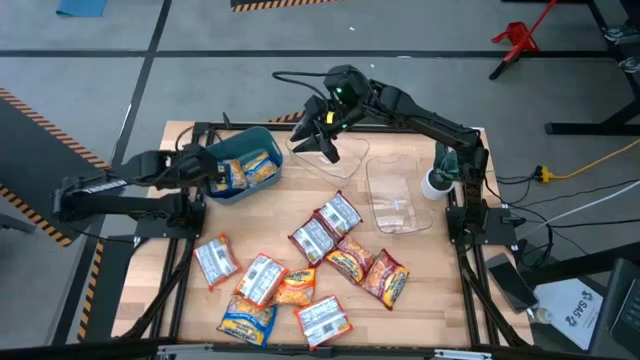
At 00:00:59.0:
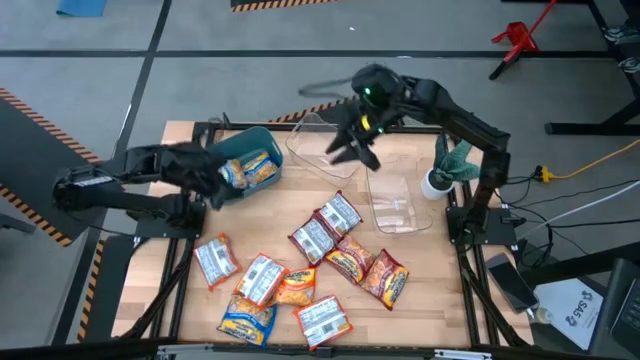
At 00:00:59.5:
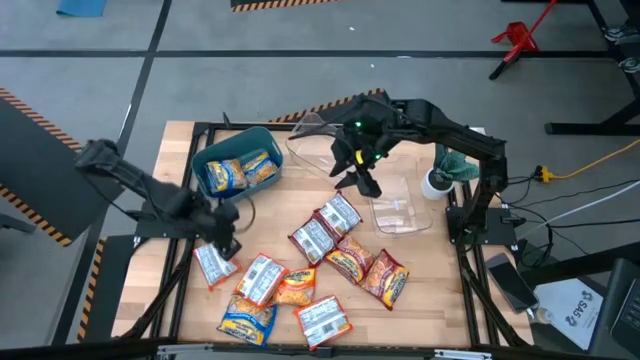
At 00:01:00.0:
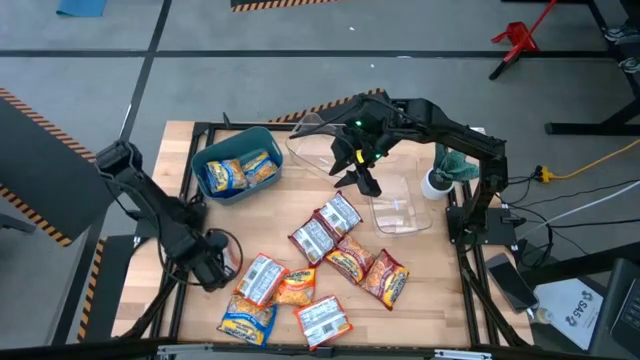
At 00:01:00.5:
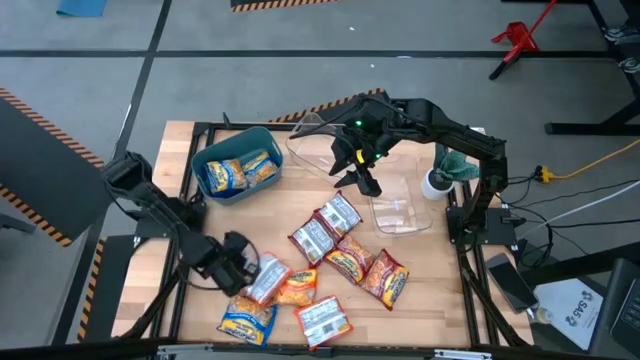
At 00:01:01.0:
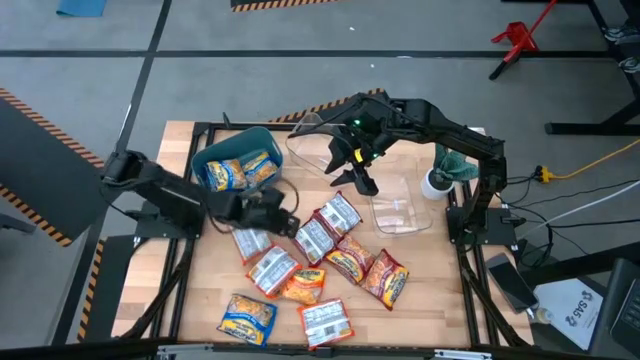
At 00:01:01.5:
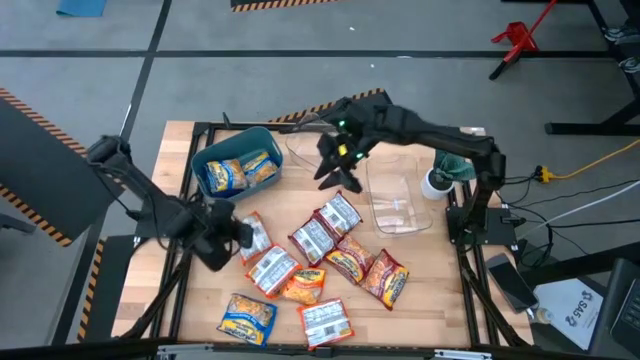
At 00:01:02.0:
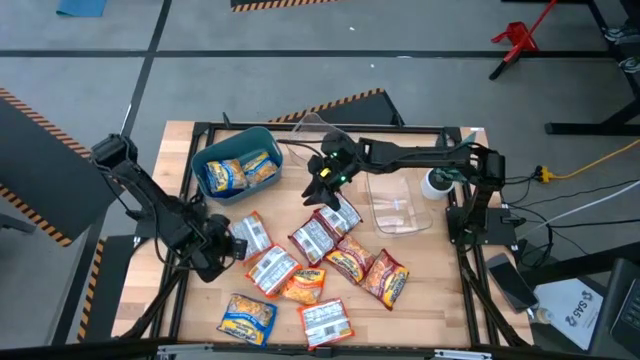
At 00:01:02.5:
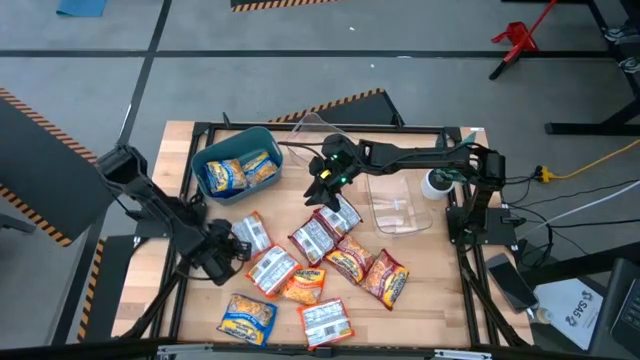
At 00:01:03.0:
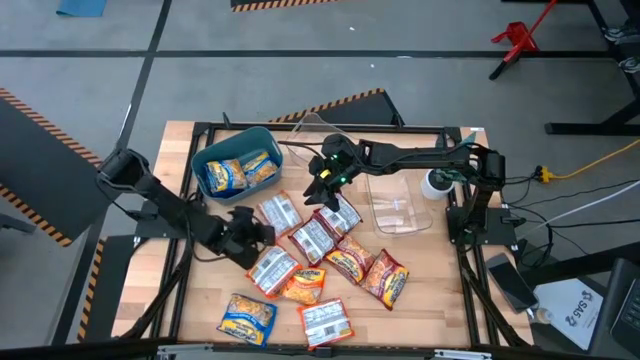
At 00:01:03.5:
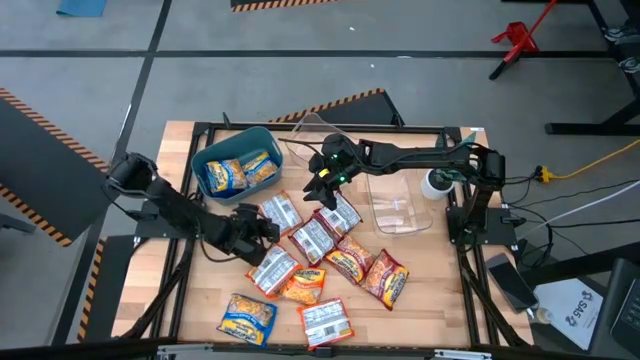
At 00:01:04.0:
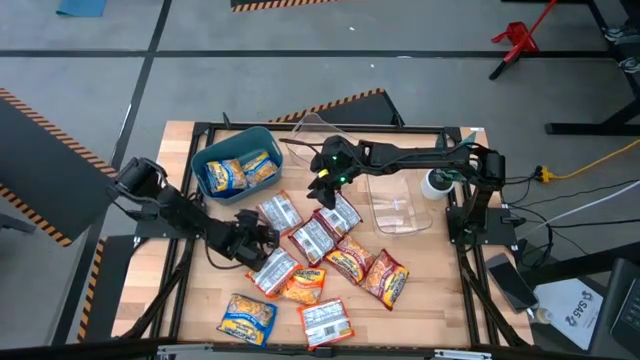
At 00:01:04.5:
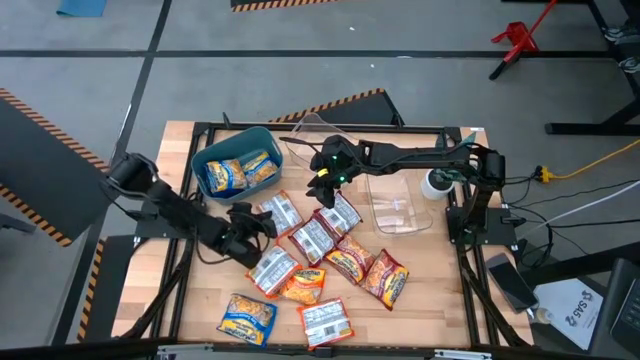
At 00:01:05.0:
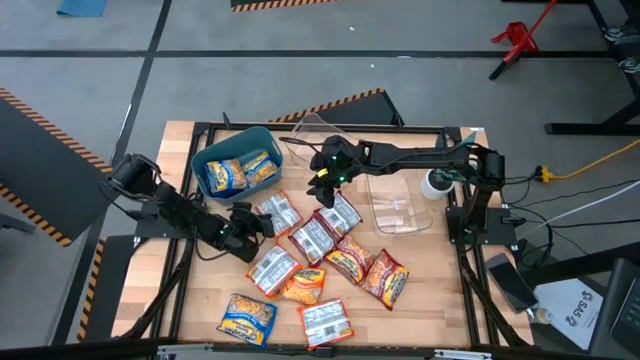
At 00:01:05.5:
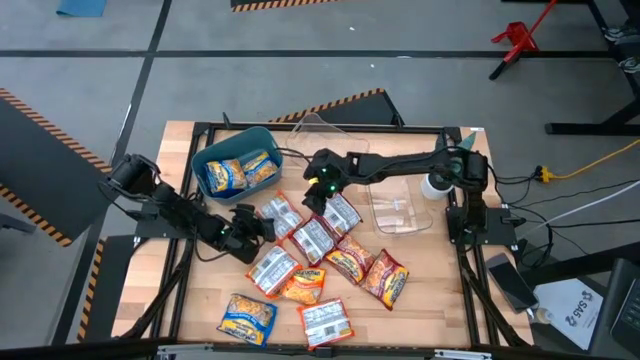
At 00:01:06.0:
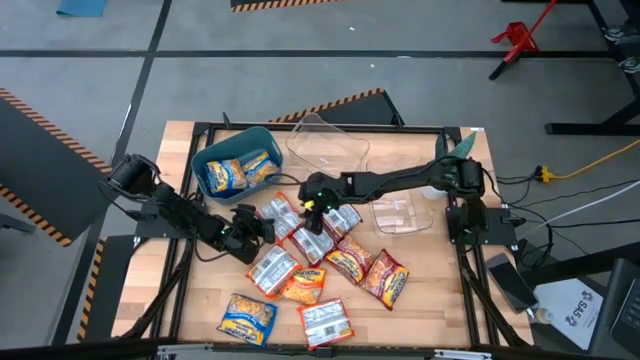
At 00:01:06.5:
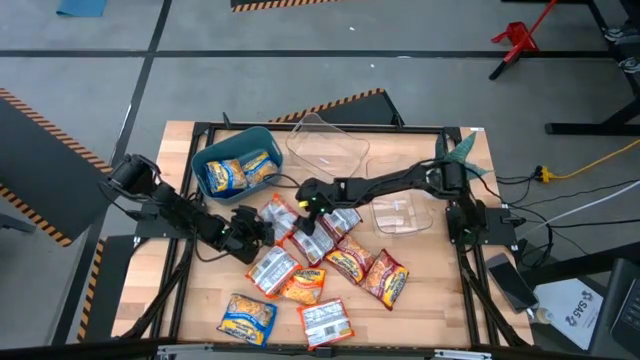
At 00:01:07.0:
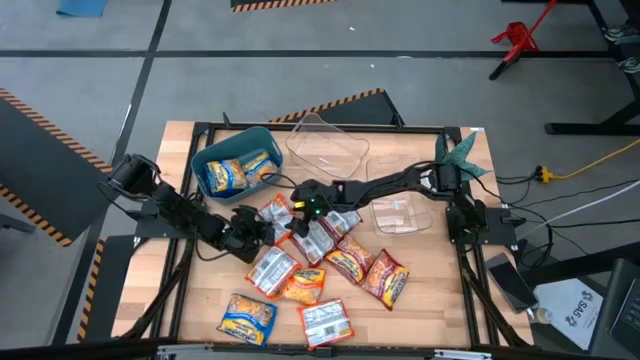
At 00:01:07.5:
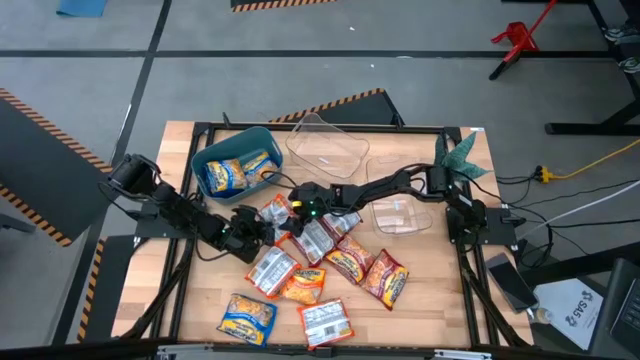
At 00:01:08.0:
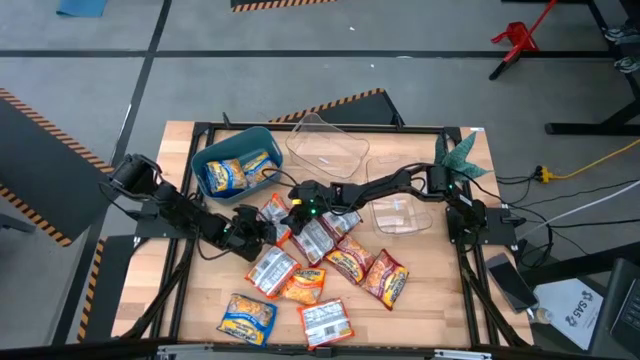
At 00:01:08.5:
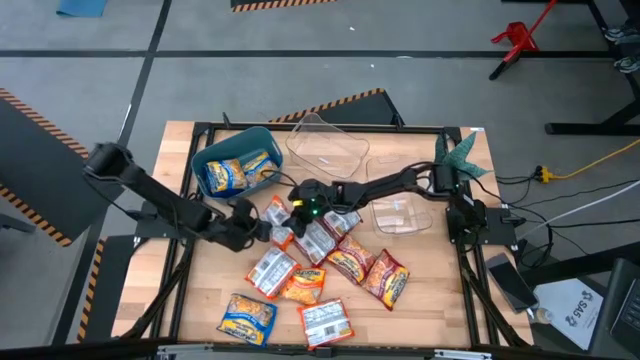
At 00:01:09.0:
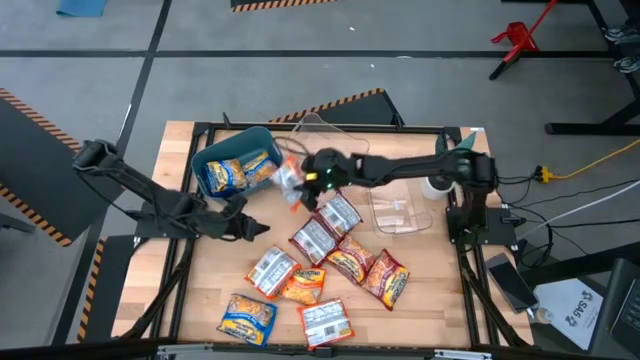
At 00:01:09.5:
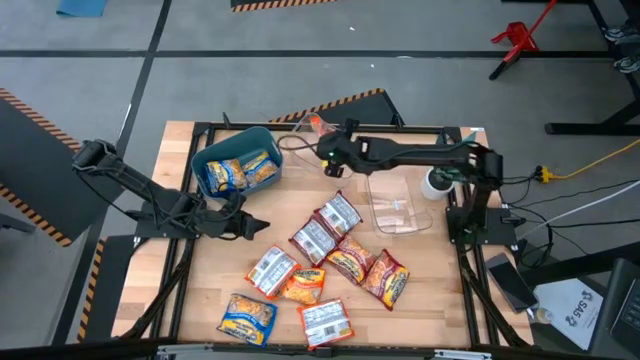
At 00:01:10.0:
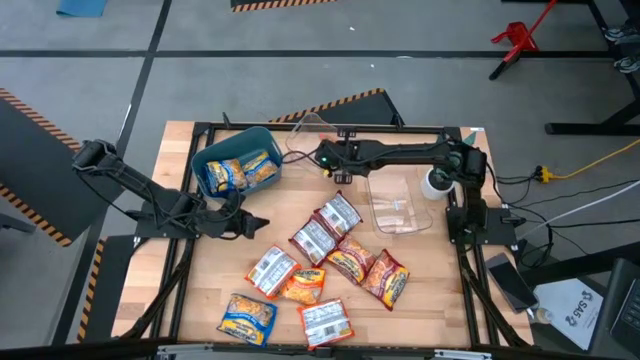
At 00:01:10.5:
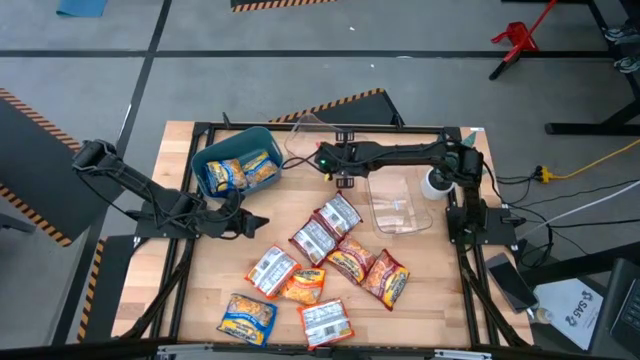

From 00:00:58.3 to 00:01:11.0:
Task: Sort Maruchan noodles
Put the orange noodle pack into the left transparent bin

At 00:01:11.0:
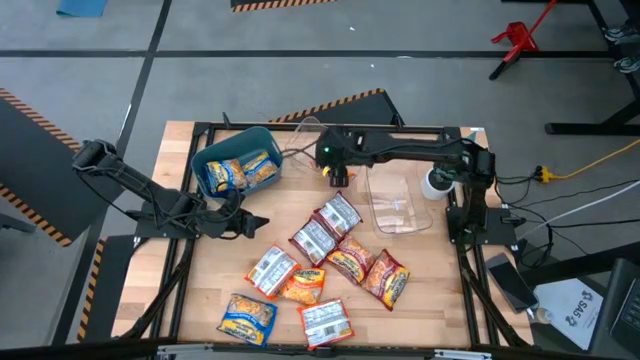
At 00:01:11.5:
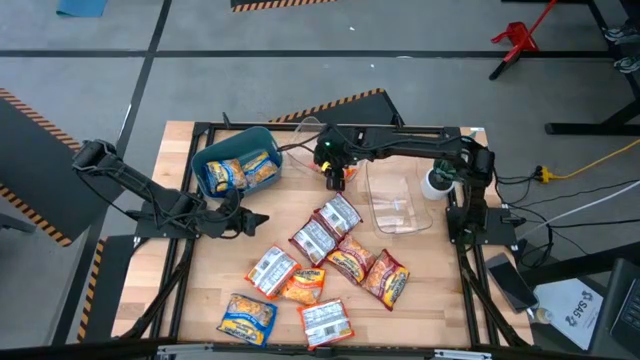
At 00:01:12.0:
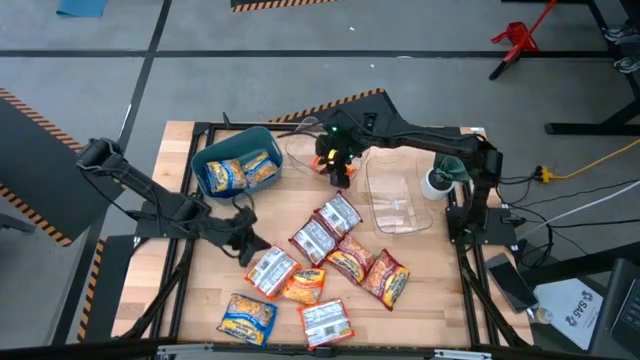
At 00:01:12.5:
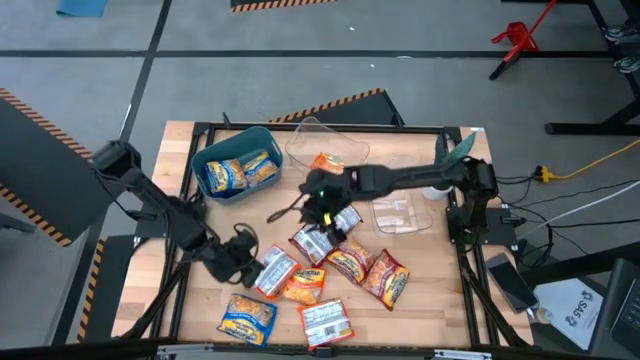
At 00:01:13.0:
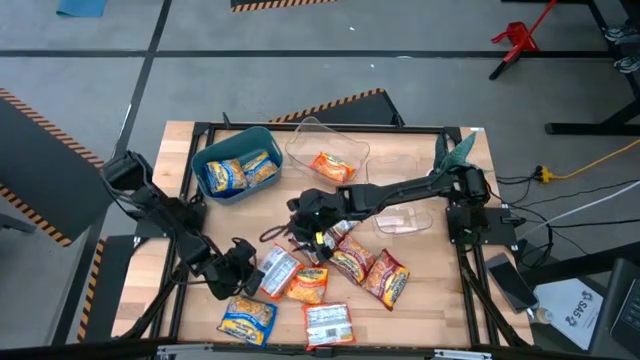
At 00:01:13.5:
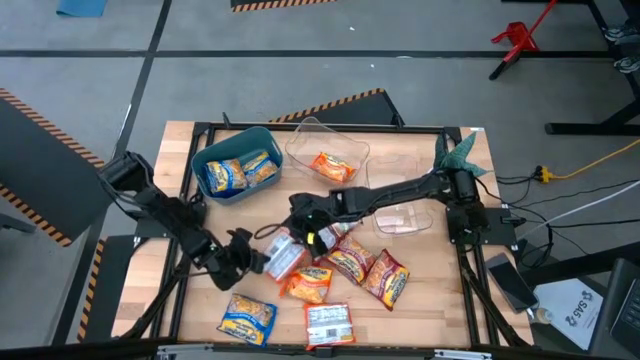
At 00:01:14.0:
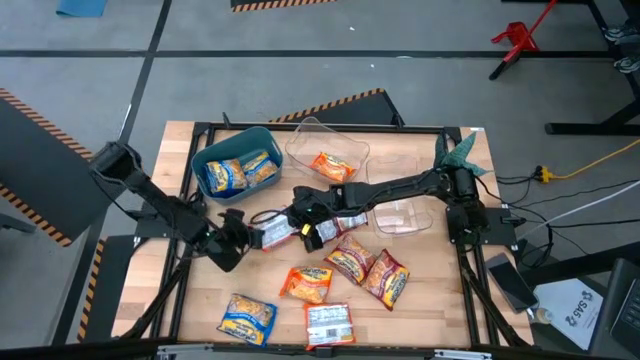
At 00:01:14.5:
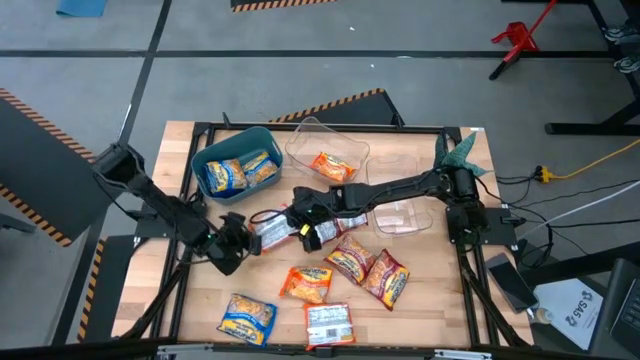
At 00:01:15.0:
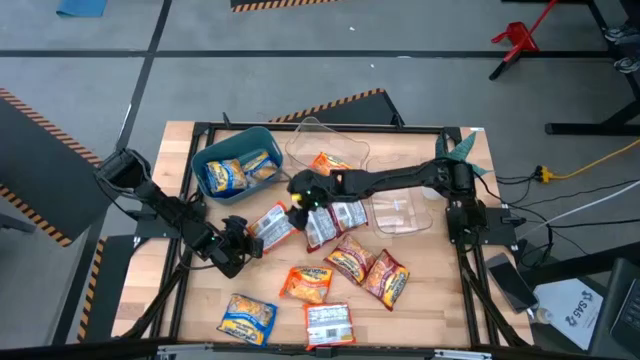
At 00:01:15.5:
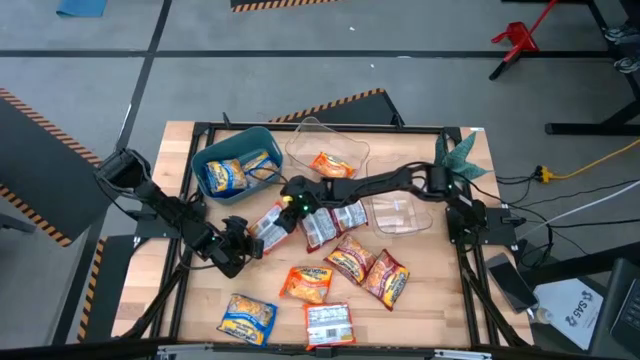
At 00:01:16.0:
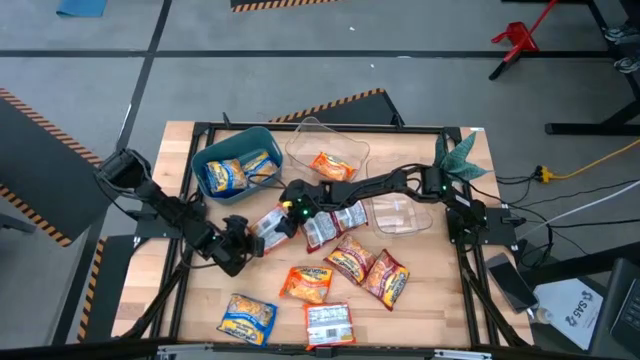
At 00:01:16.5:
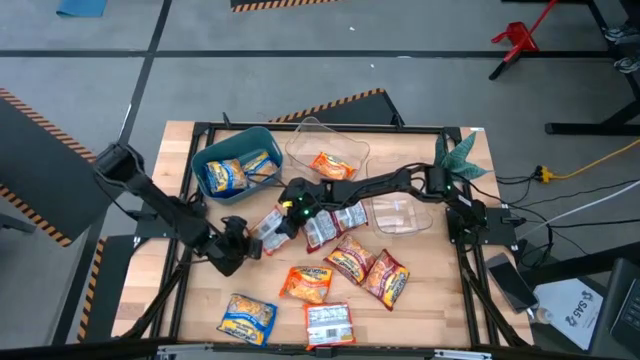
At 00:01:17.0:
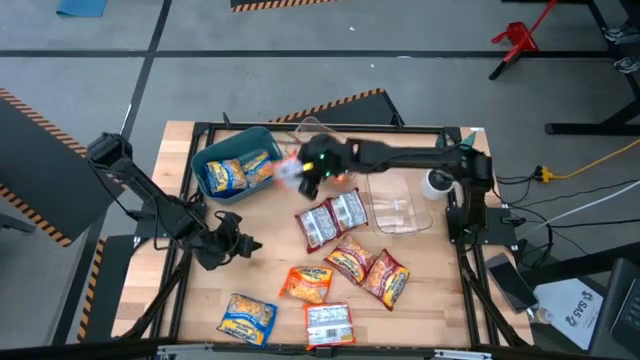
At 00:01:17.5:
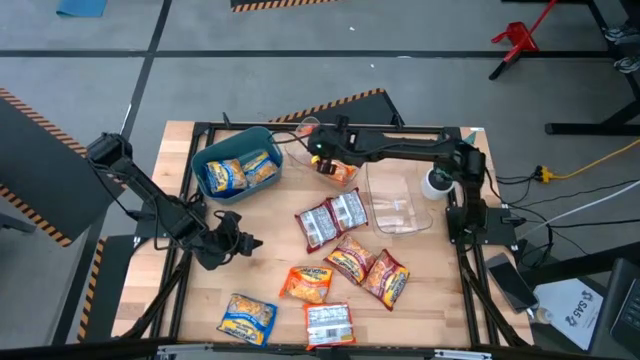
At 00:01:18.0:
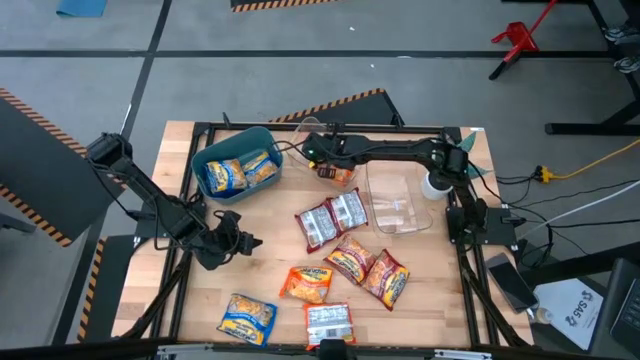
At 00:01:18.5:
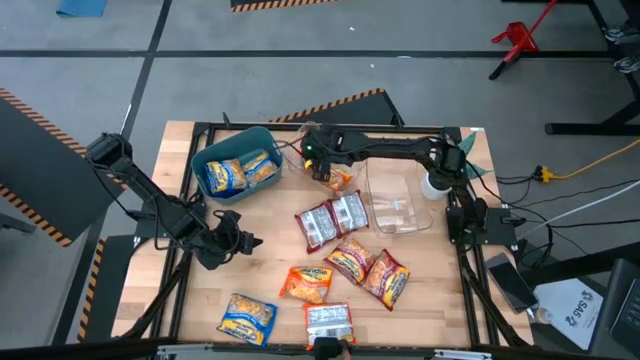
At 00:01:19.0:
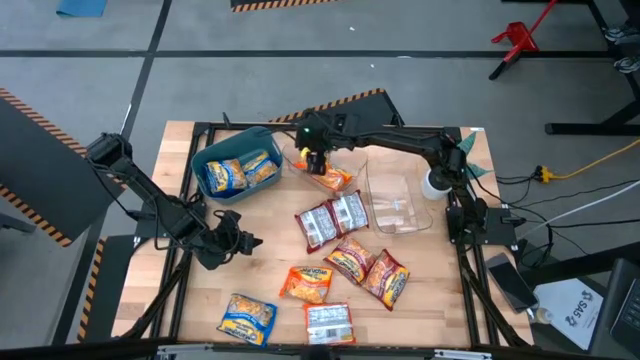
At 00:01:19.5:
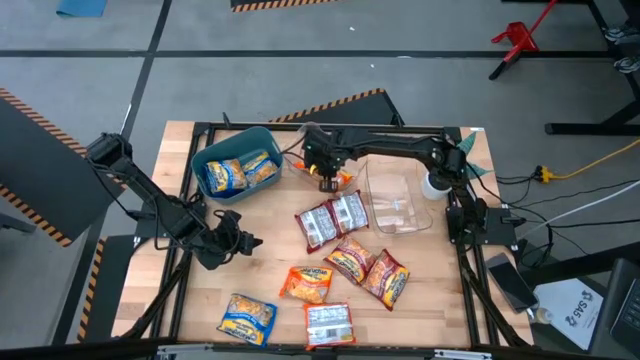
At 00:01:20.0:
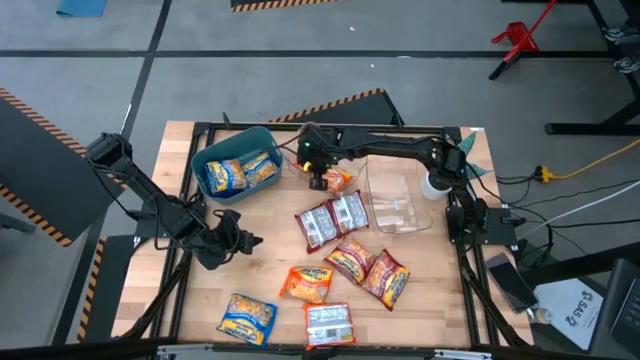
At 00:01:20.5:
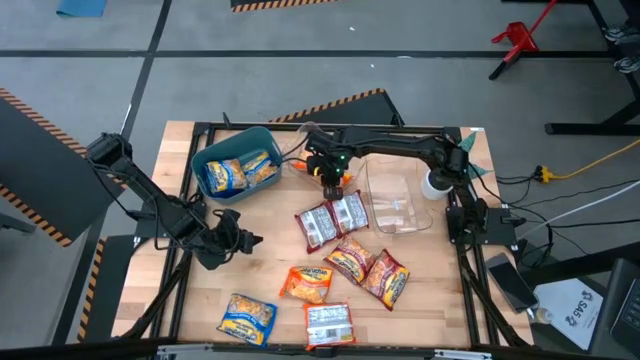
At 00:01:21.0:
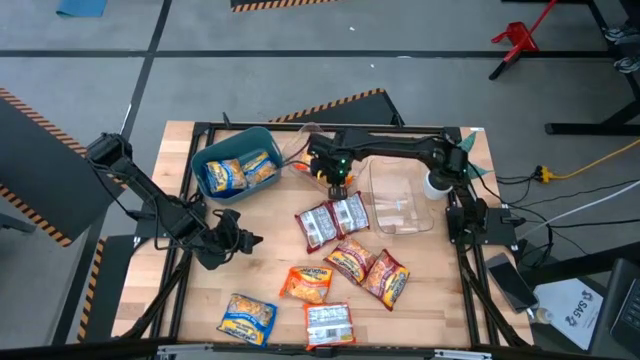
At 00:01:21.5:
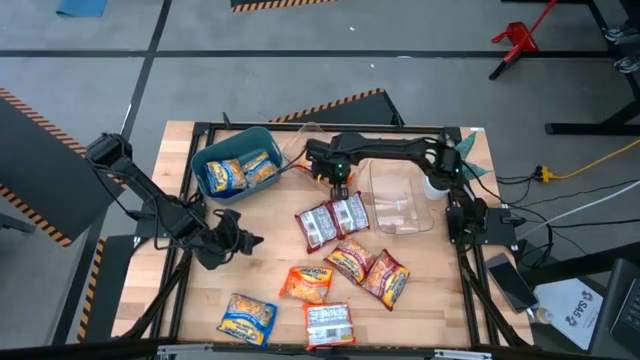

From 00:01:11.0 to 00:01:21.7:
Put the orange noodle pack into the left transparent bin
